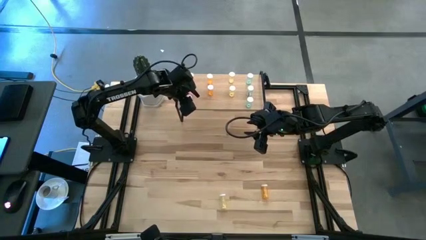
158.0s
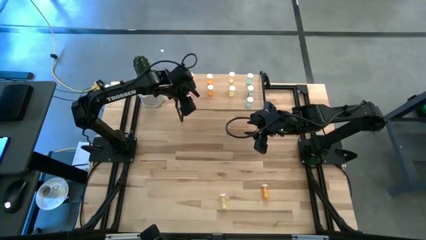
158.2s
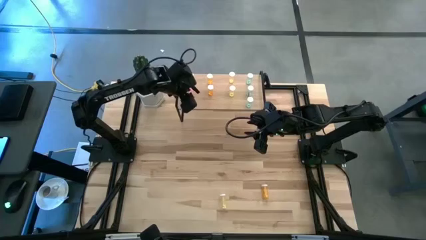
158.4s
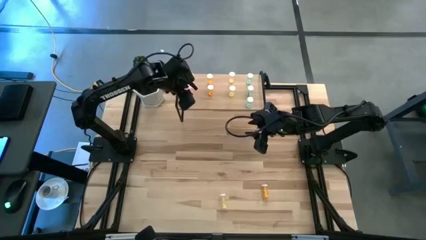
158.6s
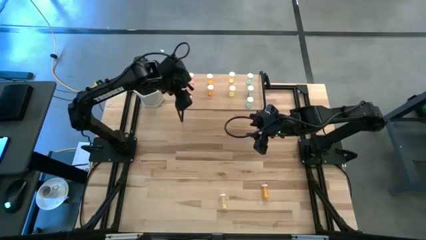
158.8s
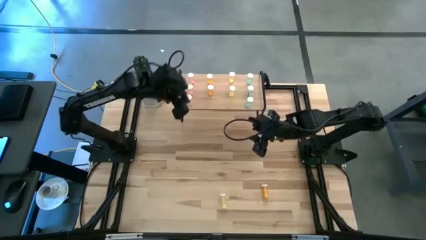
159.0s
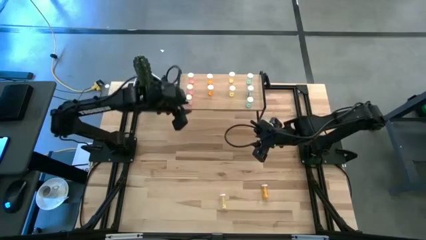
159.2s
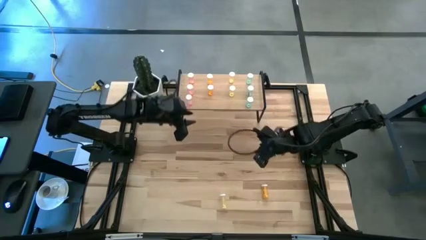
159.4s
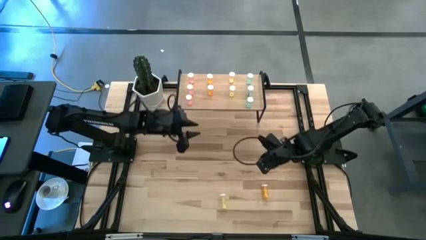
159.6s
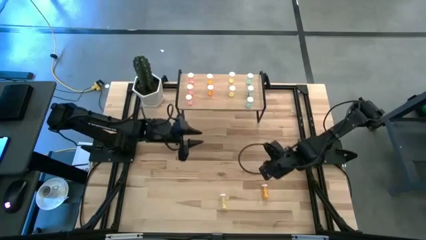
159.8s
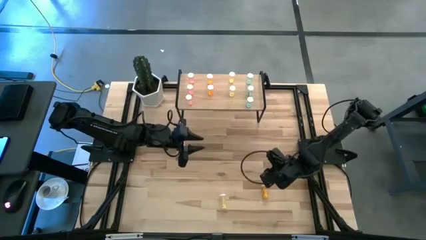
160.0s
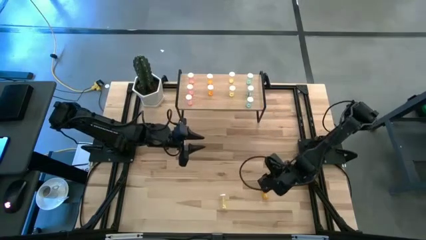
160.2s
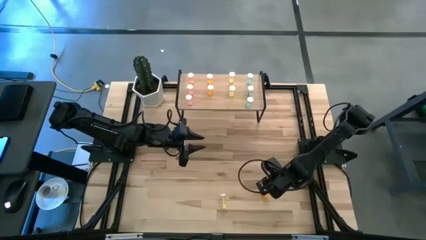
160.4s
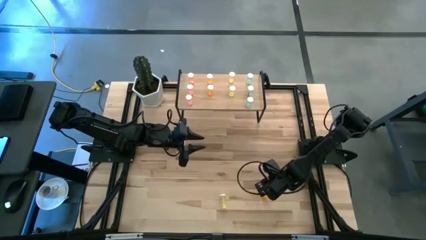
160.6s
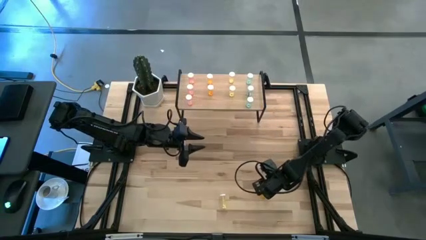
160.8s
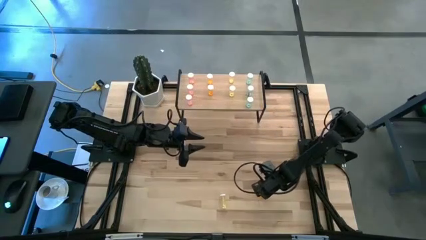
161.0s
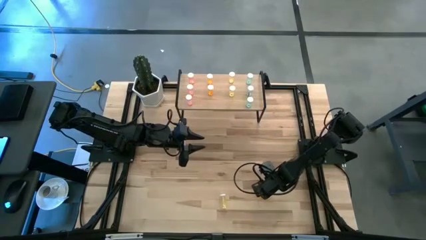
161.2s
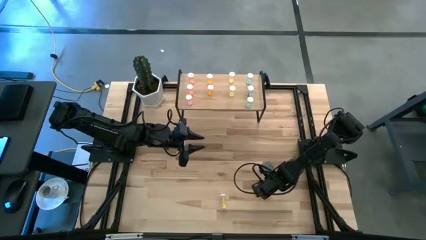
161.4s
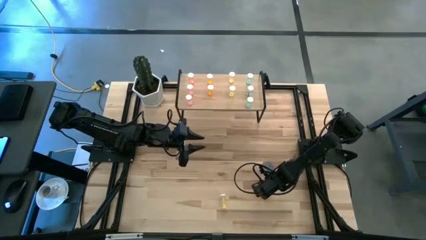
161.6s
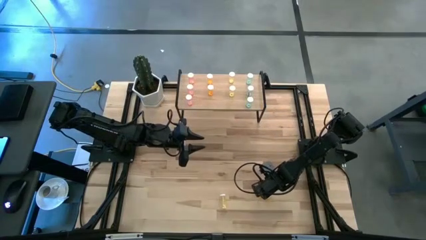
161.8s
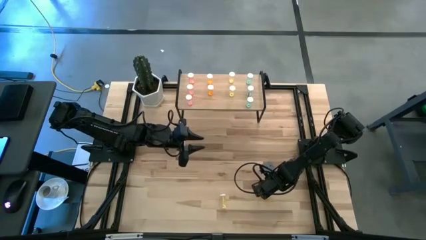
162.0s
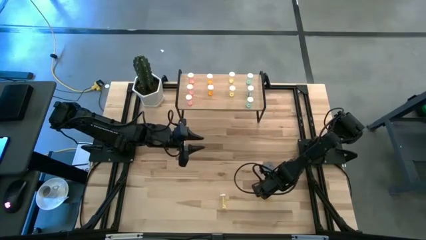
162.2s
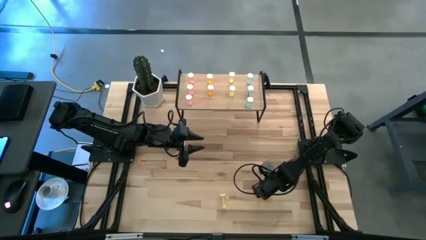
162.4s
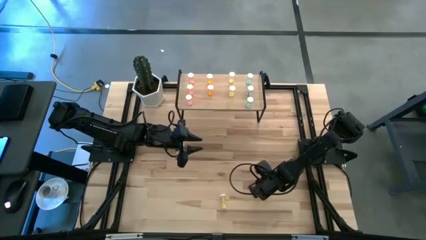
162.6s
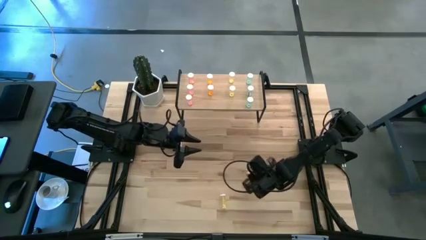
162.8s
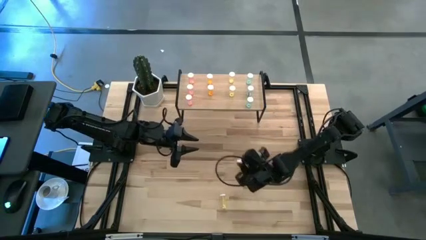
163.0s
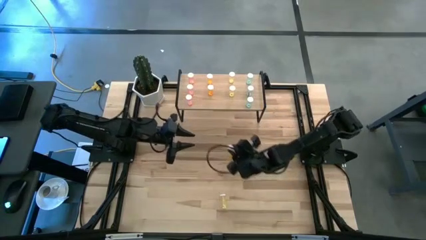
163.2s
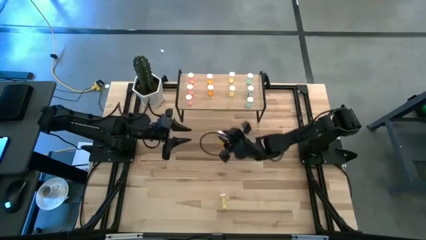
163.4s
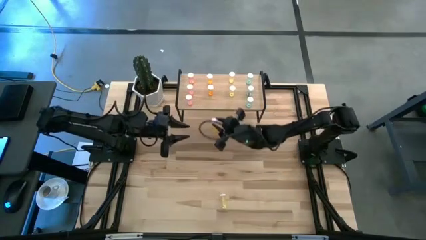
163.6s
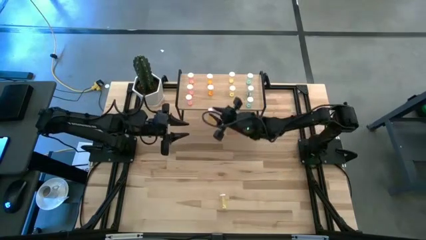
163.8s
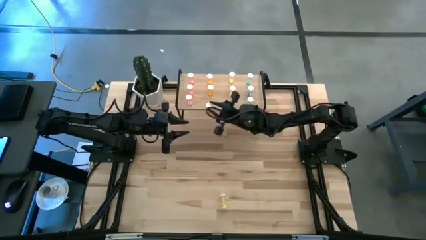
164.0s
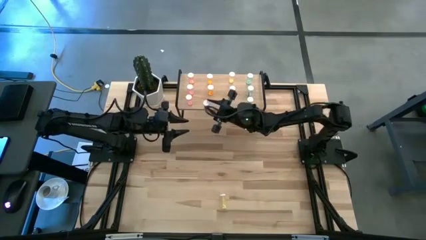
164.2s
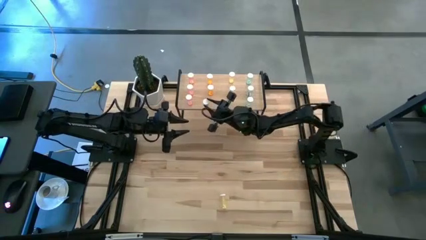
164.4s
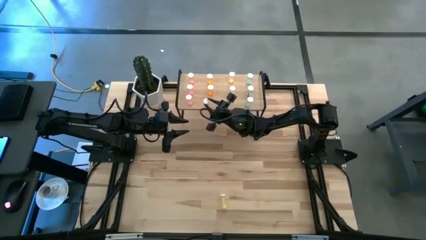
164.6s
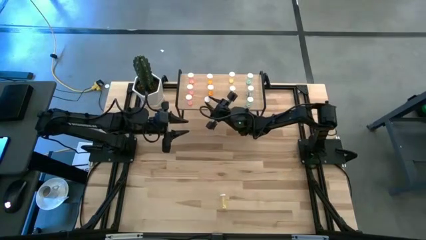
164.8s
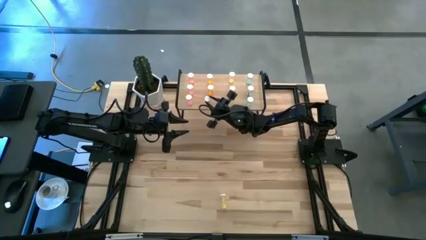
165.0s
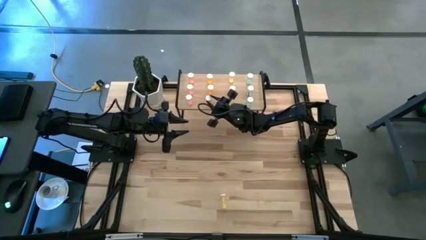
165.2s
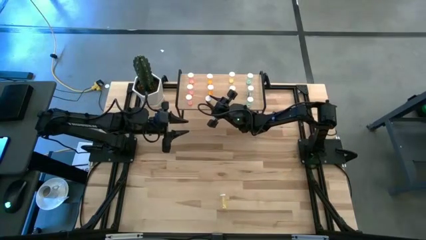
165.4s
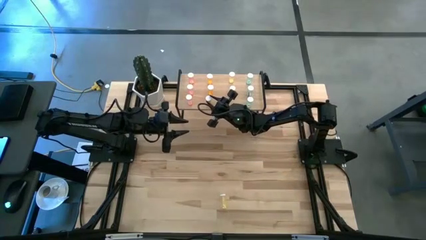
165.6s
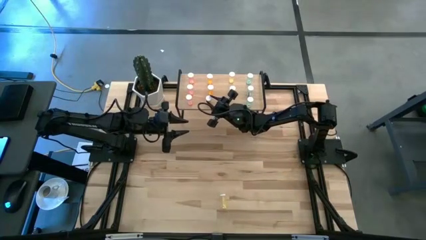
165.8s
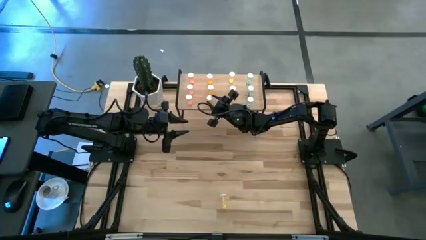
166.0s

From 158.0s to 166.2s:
Task: Pick and place medicine bottles onto shelf by color
Put the orange pill bottle aligned with other orange pill bottles on the shelf

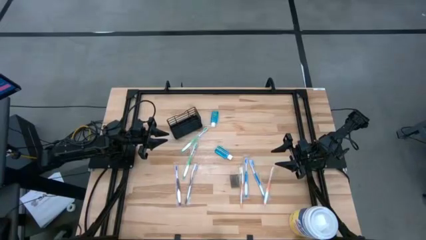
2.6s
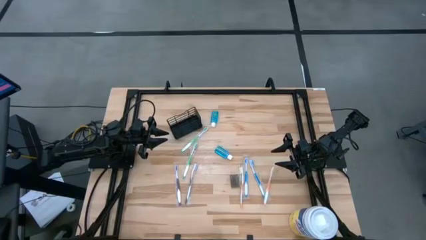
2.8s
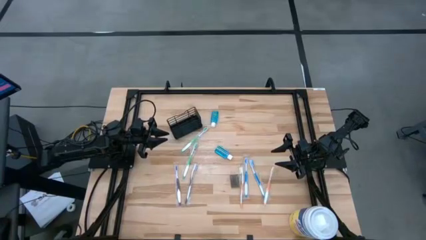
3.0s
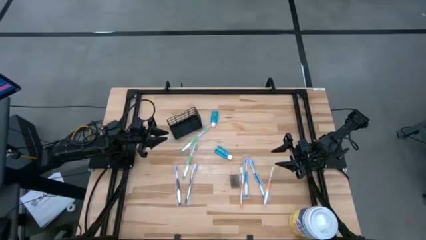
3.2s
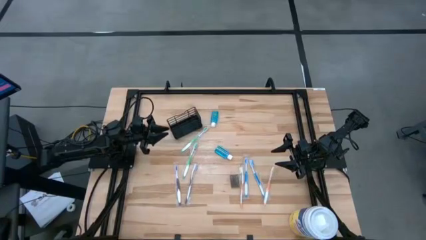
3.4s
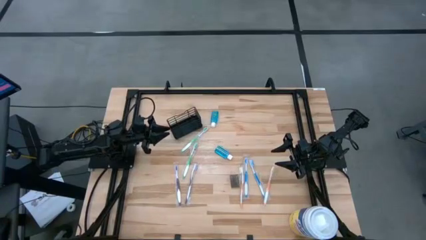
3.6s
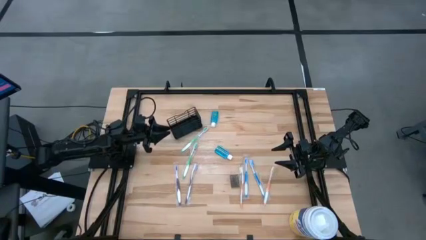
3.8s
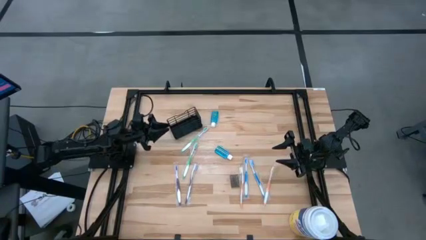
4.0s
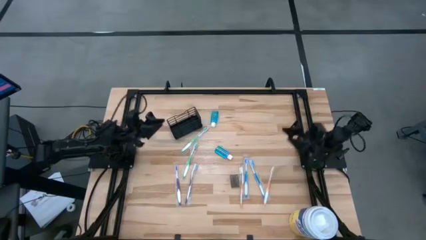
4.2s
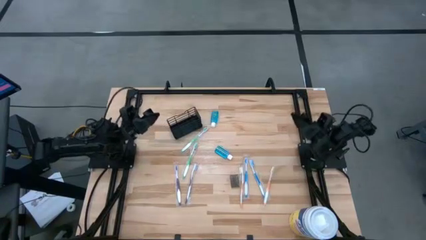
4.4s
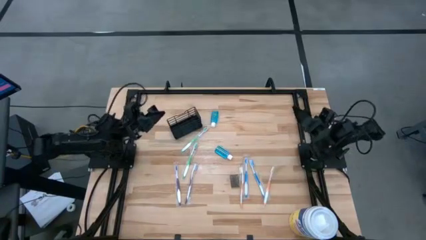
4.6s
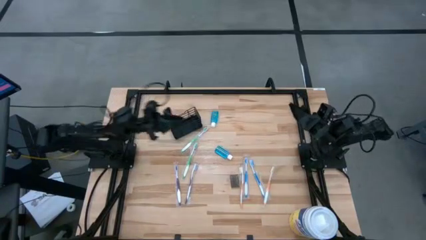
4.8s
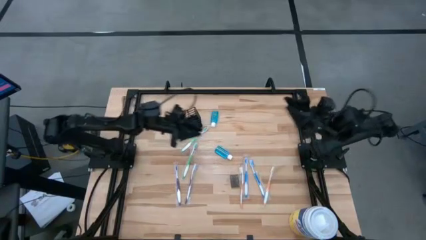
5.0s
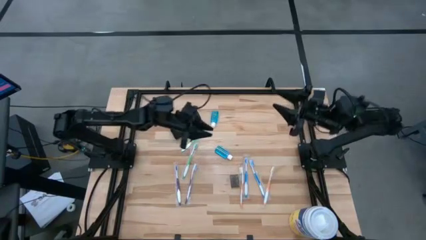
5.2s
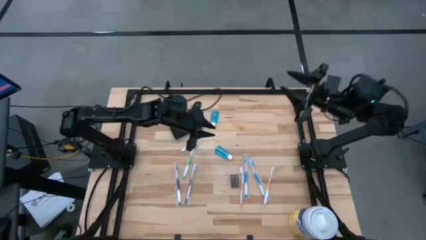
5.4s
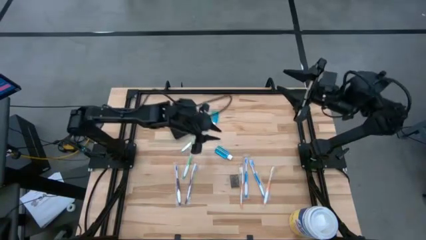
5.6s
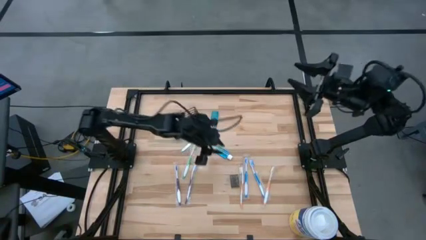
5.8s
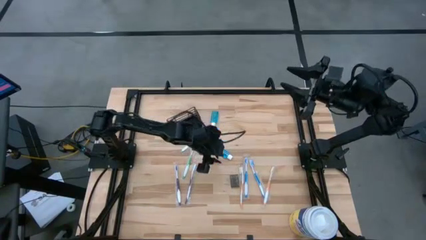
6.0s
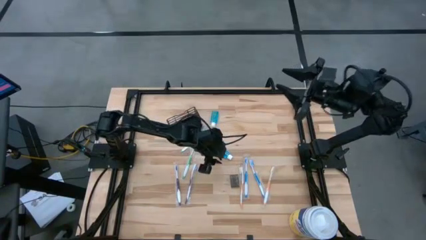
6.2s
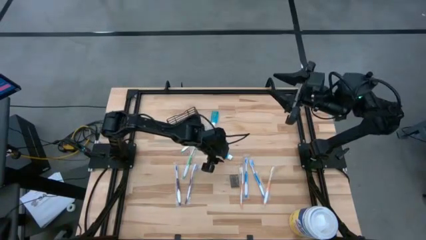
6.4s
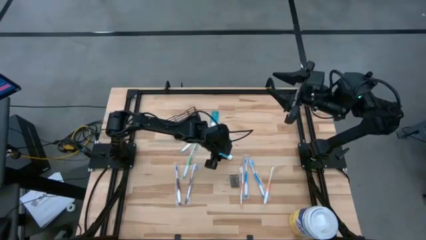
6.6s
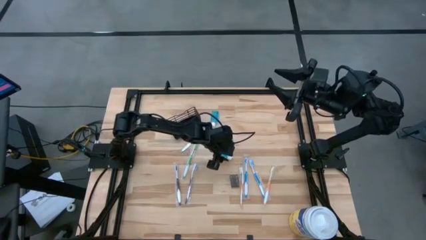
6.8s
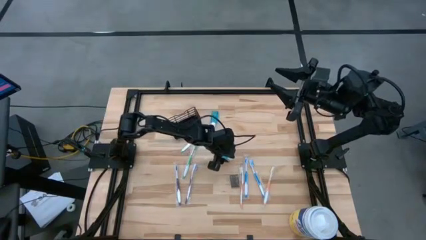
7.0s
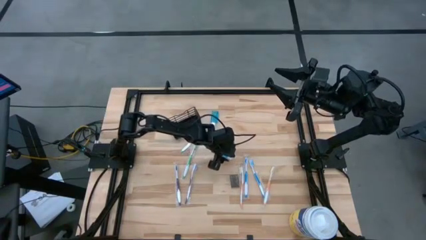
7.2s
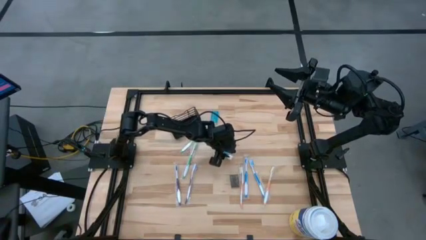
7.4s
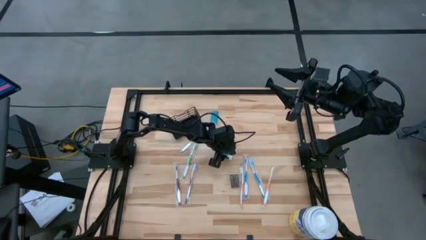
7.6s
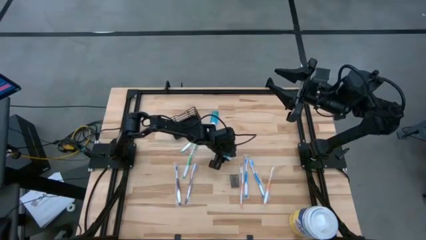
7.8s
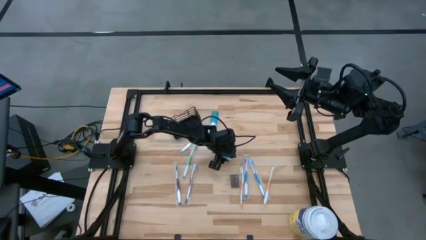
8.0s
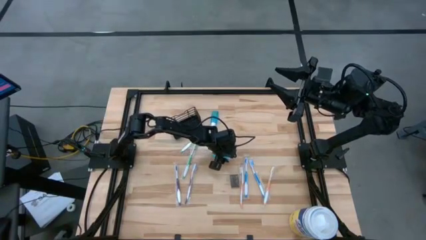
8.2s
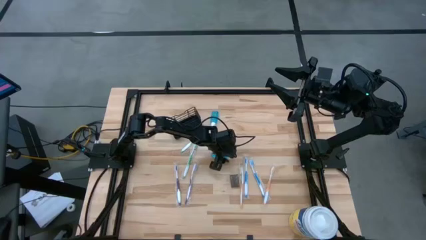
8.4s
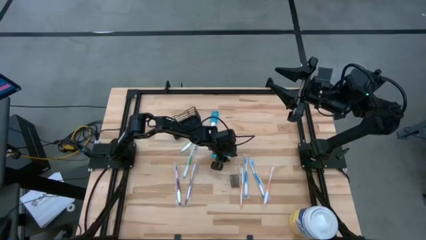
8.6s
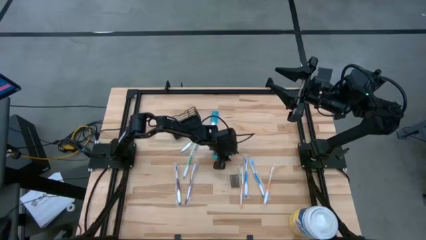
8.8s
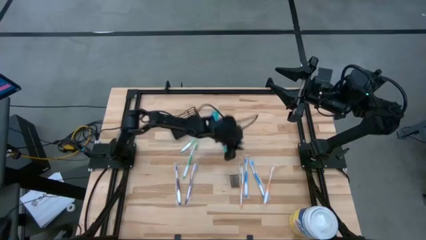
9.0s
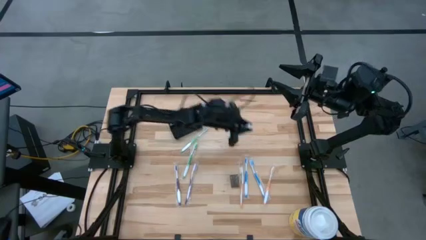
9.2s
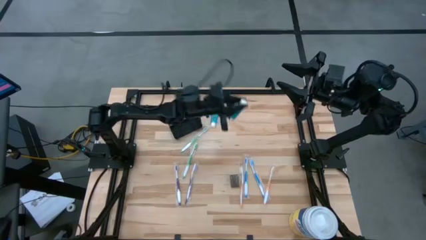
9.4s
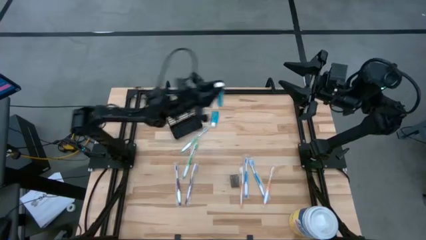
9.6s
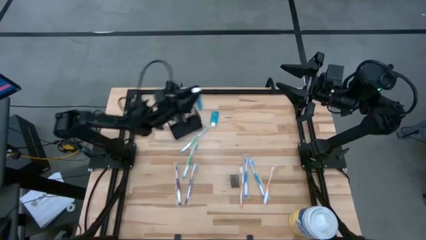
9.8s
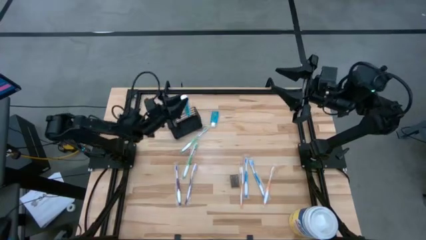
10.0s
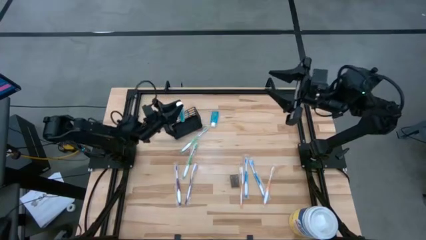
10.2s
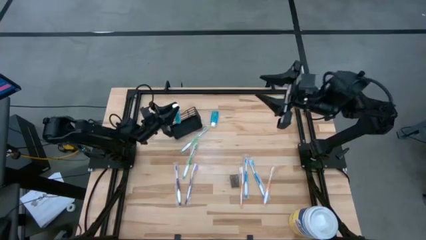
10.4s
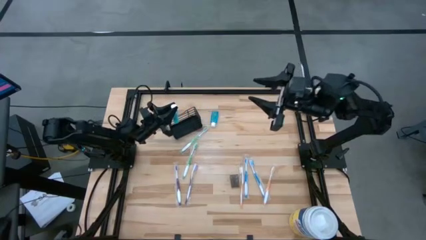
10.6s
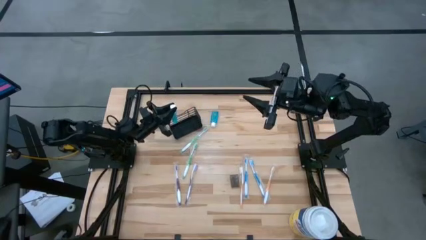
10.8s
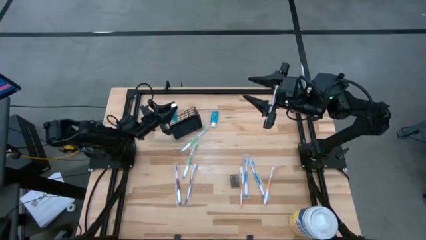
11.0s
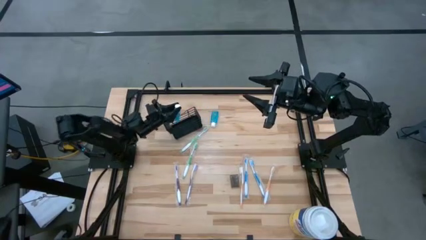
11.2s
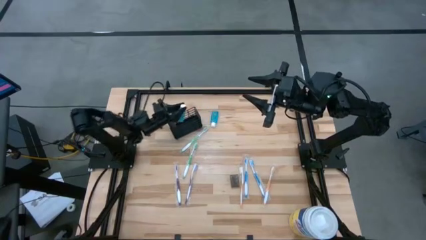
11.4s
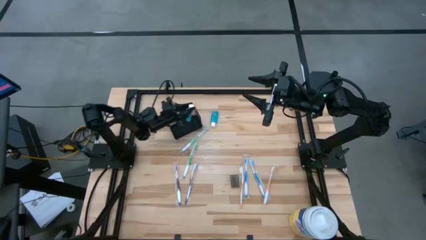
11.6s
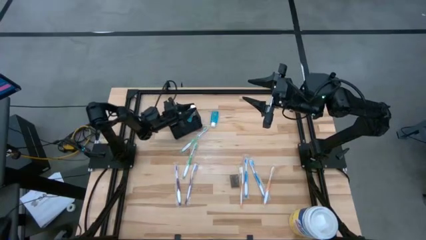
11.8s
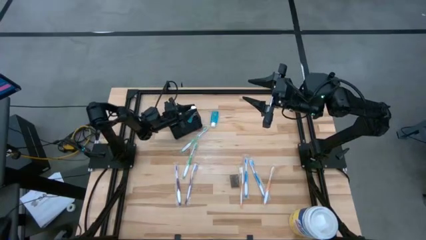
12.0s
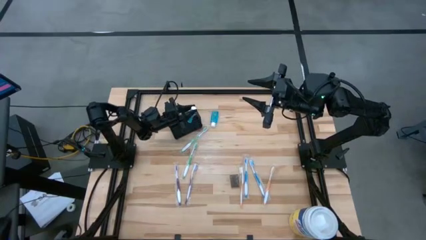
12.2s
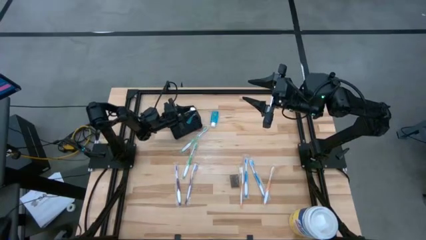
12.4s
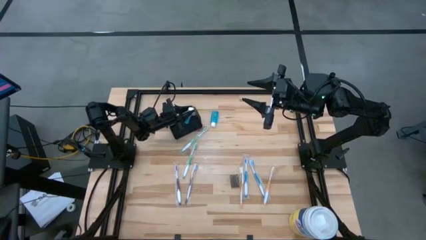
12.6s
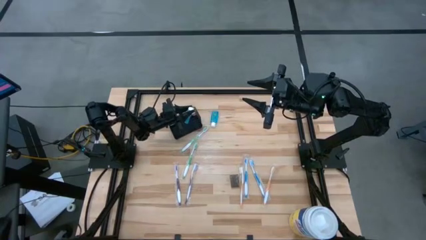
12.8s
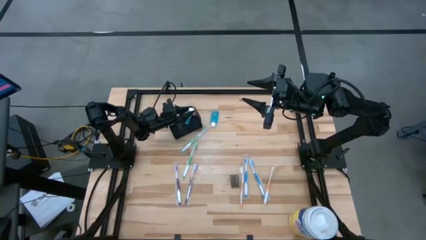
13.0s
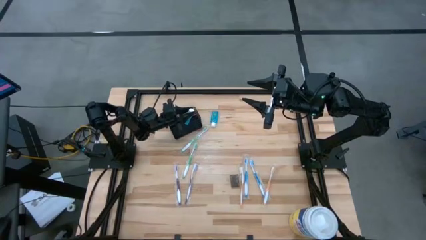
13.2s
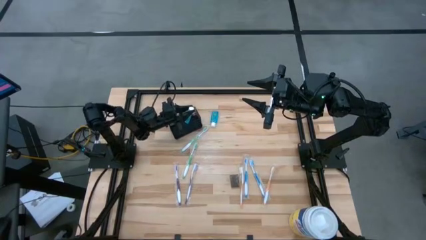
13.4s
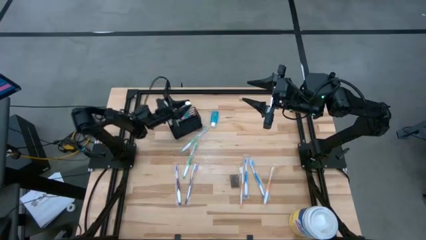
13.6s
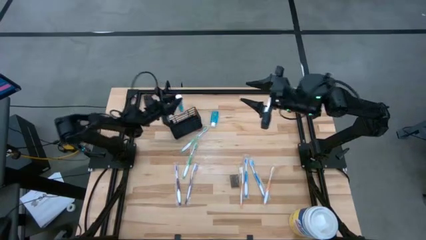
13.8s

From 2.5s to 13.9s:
Task: Pick & Place toothbrushing station
Put the blue mouthwash into the black organizer
